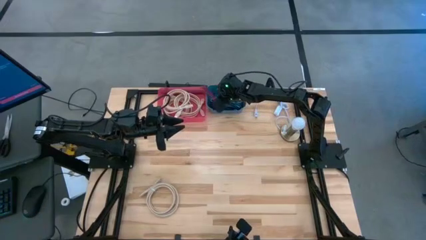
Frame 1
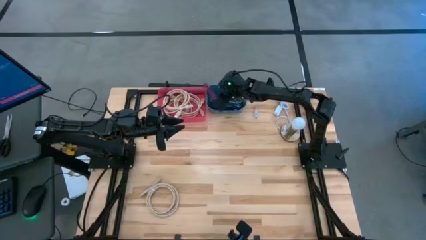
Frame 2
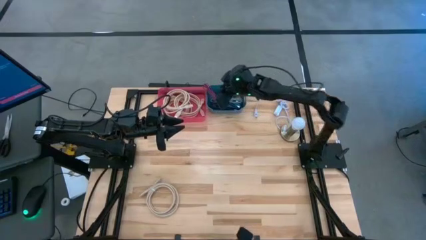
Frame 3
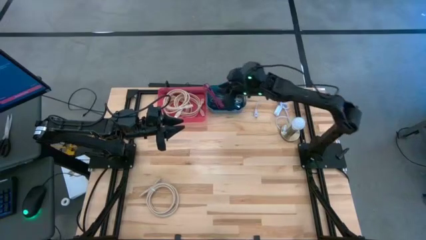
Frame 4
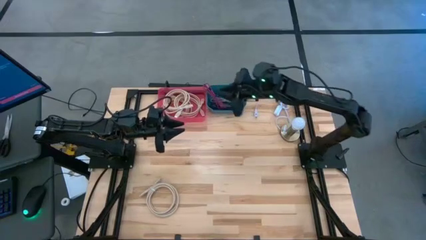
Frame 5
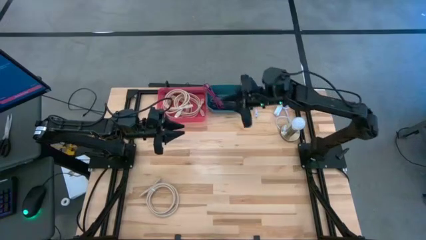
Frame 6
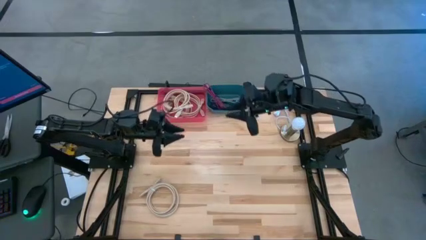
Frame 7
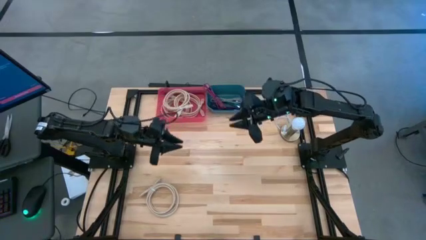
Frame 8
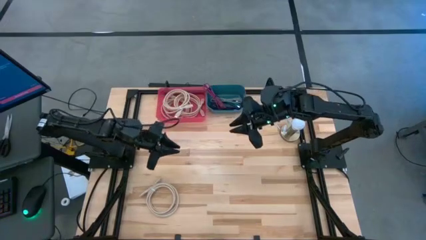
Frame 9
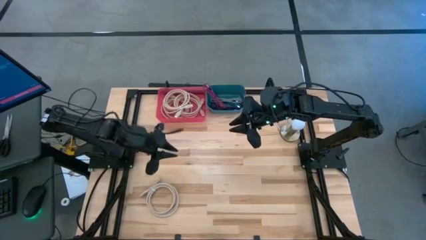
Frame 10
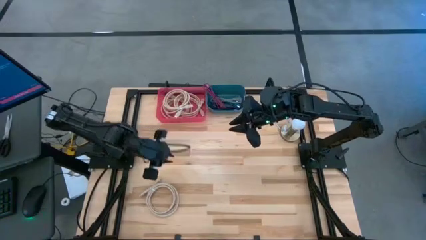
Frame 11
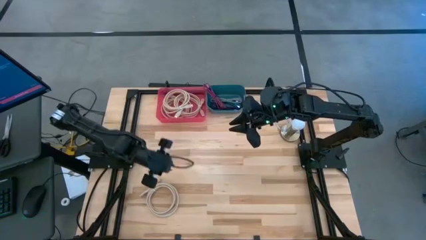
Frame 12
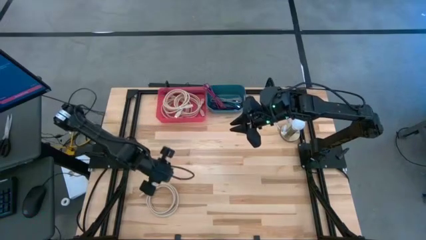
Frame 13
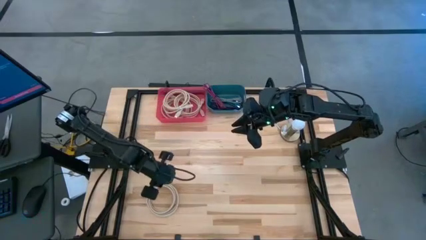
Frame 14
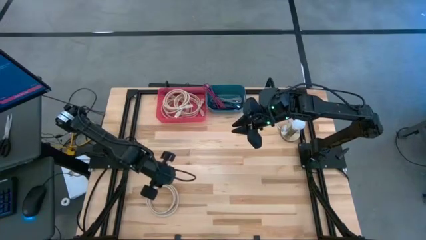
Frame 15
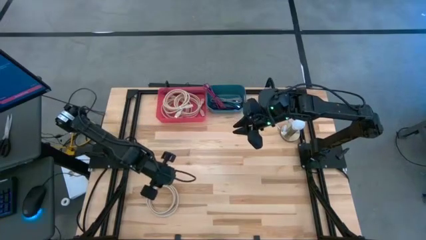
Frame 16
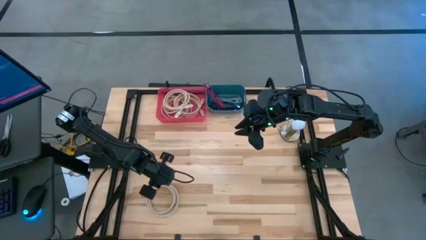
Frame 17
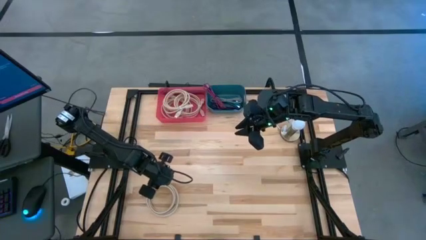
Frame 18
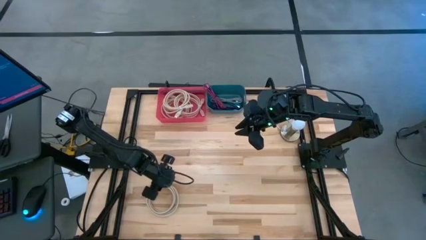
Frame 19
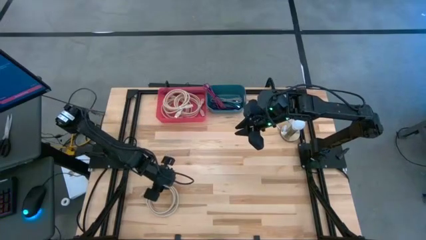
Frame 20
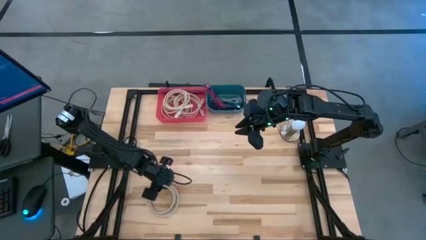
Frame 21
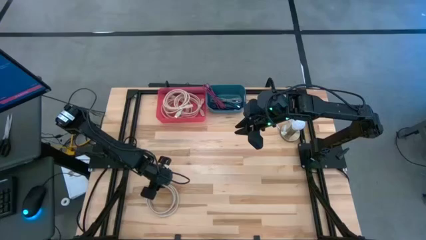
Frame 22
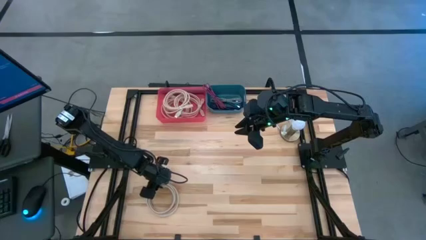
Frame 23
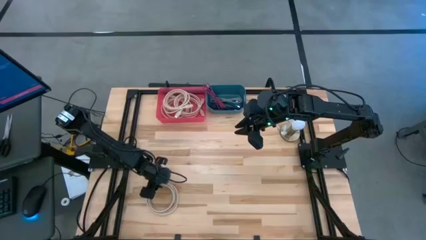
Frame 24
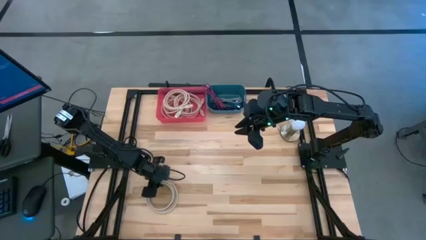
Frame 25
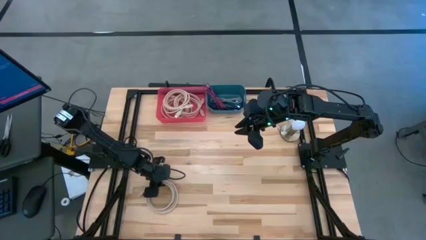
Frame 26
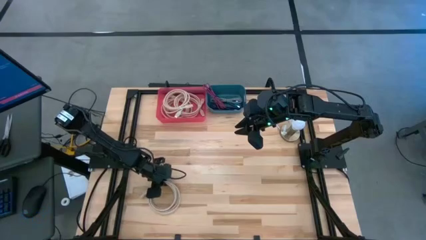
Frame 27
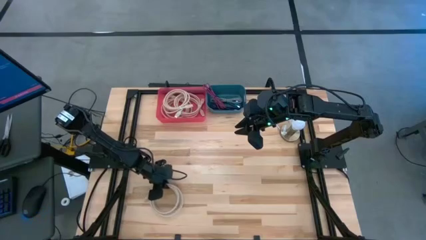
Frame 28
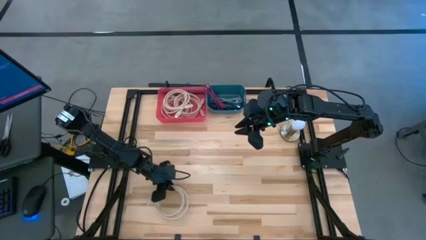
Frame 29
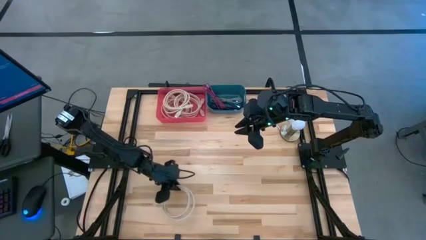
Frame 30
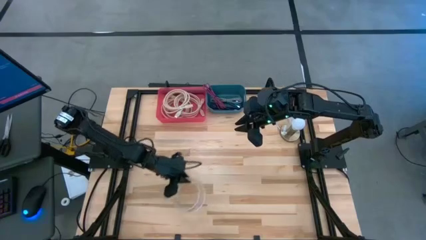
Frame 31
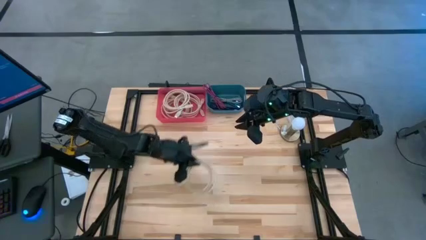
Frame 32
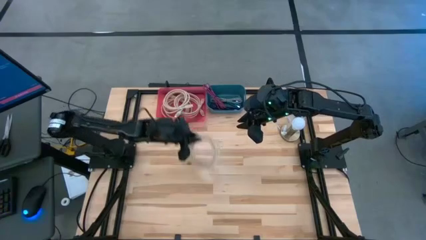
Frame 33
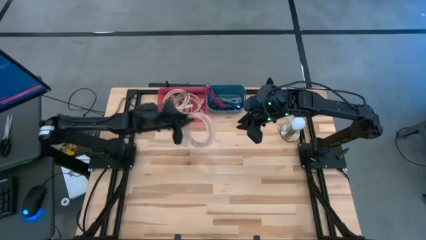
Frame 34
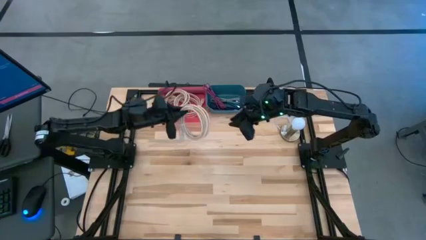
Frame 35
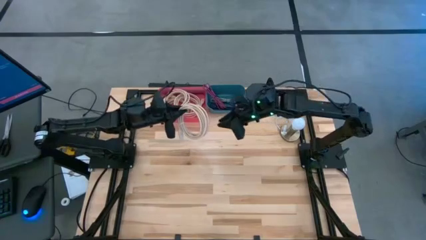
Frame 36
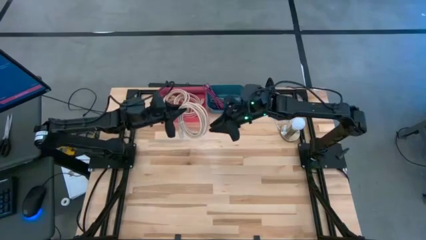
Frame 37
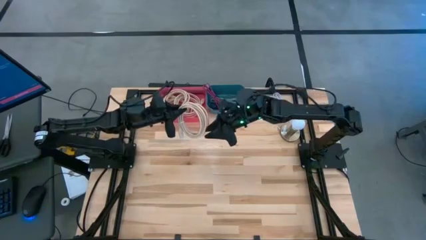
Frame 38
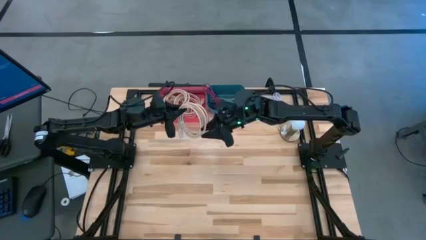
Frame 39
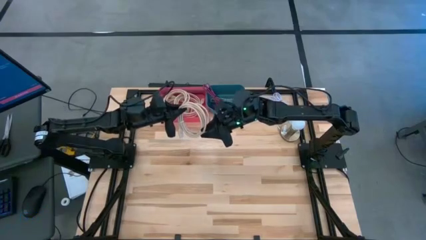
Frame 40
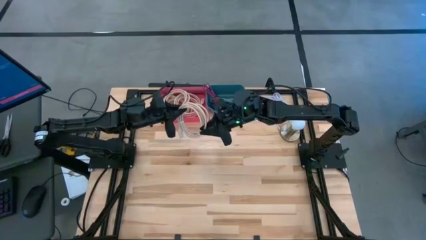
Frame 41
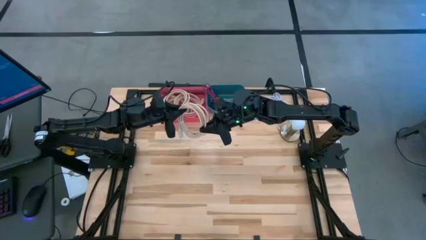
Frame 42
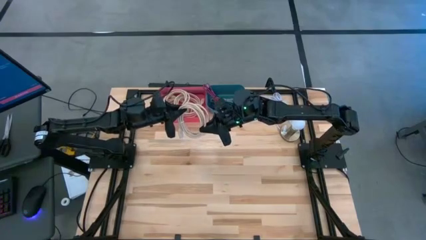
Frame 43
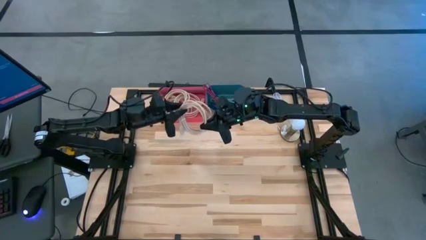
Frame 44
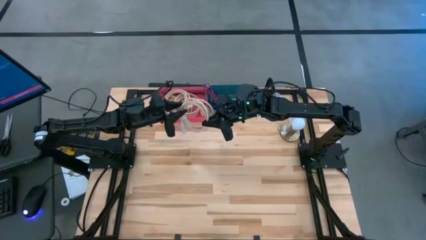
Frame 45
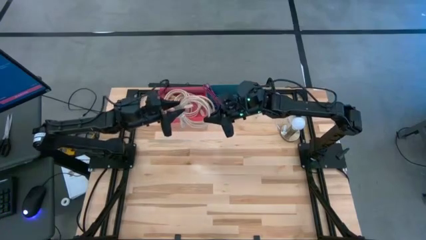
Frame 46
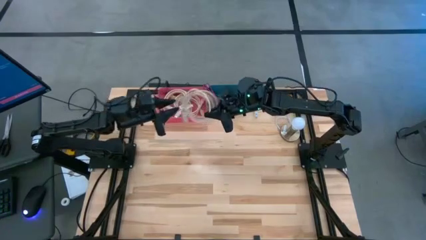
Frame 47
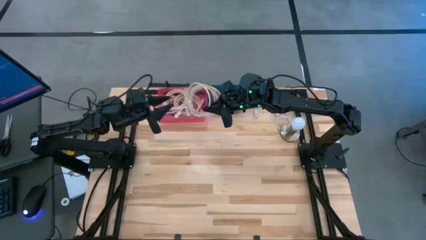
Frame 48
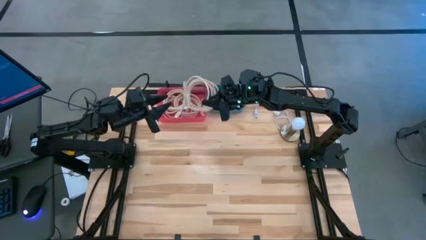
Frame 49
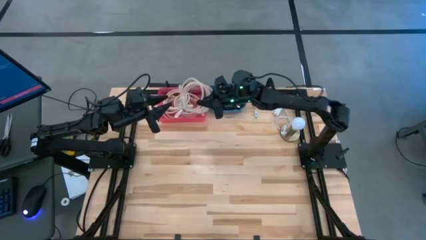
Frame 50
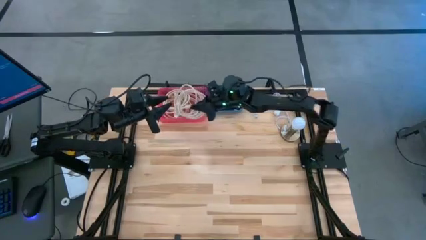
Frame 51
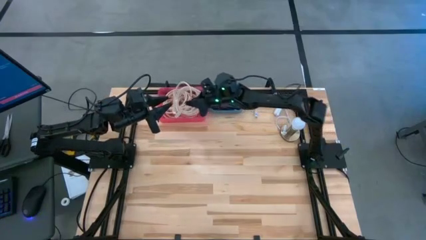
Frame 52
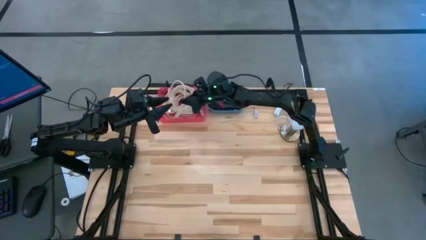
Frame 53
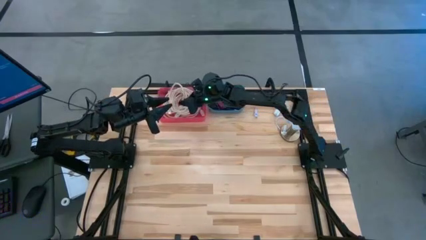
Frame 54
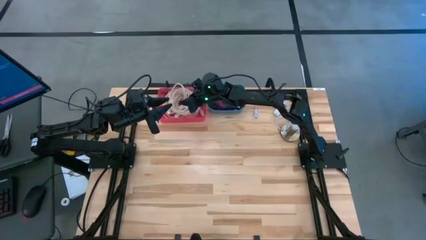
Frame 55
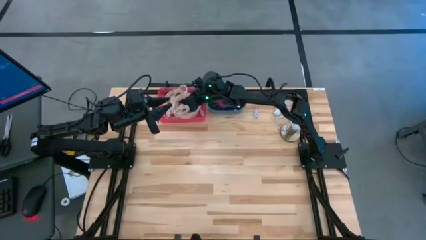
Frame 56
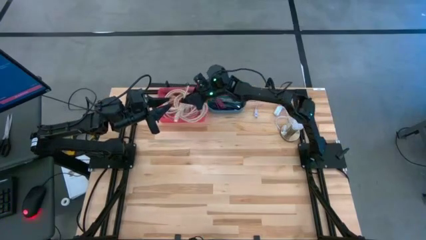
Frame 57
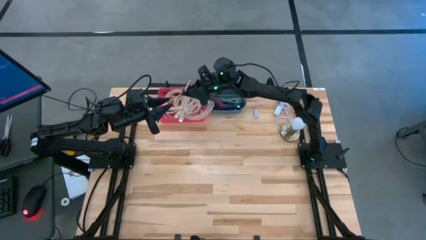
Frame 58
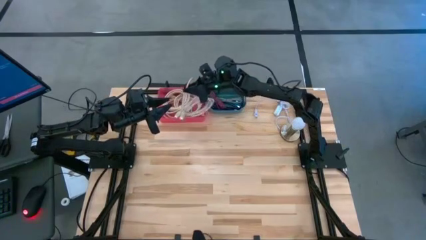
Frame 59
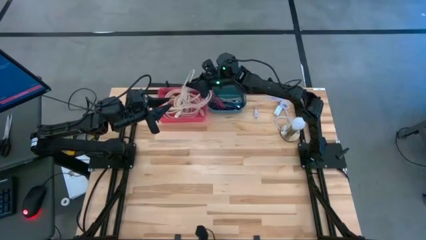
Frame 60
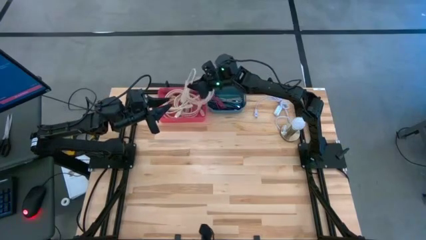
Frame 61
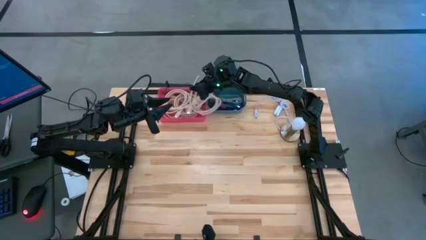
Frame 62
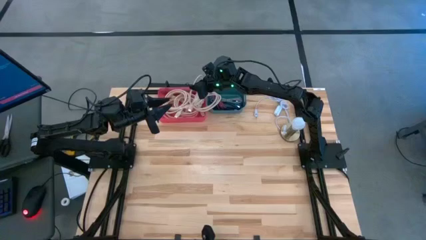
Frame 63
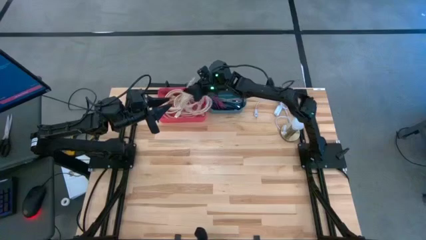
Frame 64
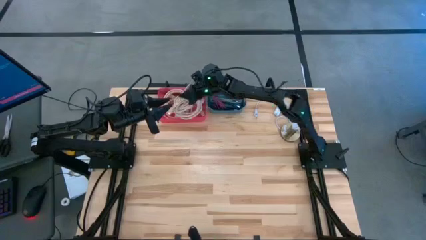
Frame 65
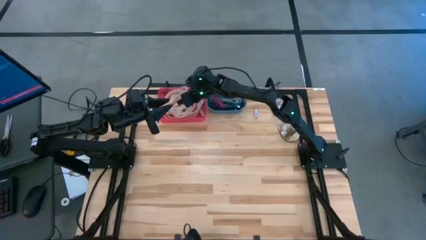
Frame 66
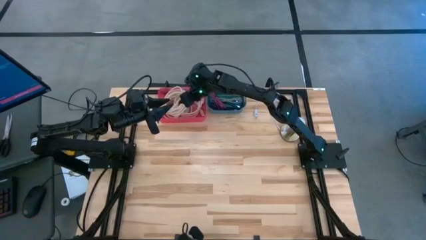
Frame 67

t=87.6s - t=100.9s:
Task: Pick & Place USB Port
Put the brown HDMI cable into the red bin

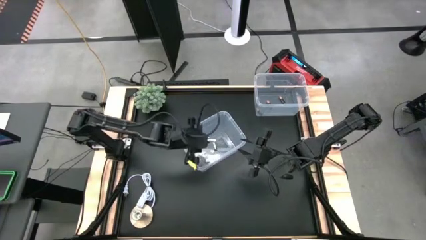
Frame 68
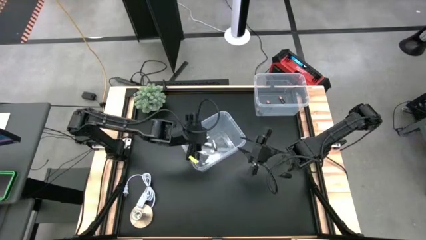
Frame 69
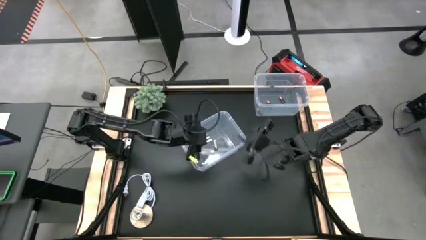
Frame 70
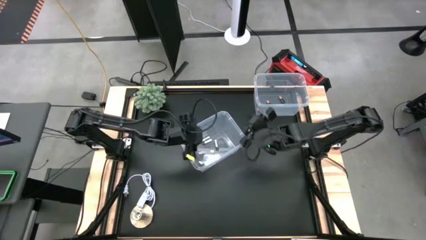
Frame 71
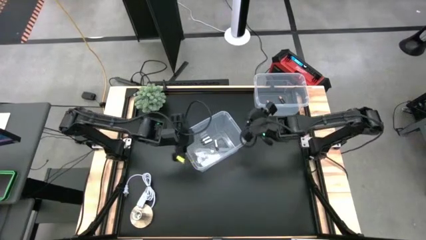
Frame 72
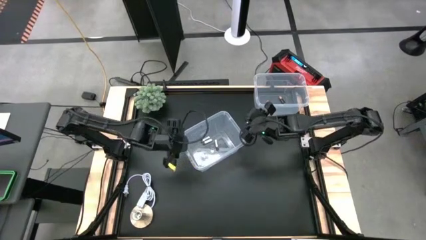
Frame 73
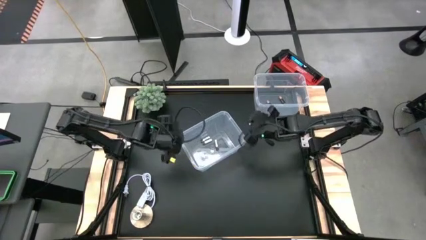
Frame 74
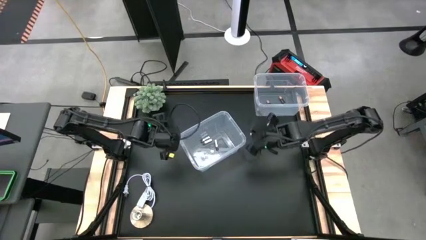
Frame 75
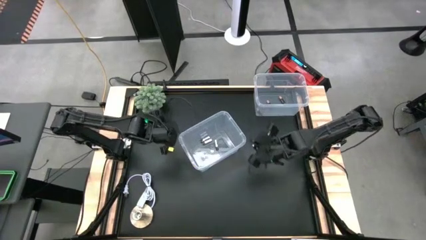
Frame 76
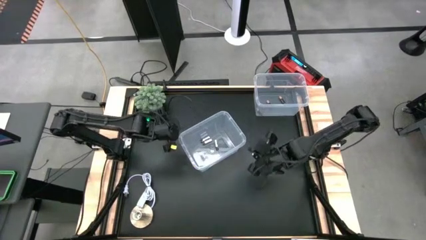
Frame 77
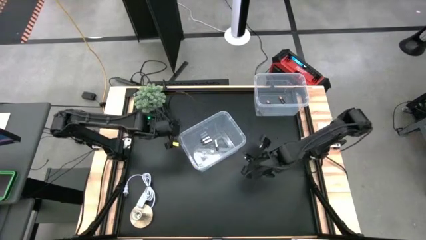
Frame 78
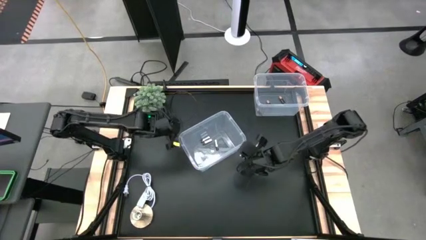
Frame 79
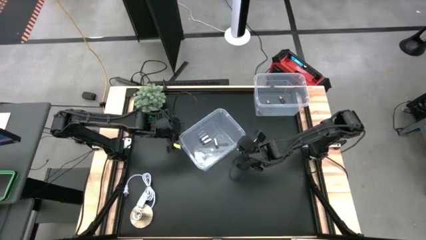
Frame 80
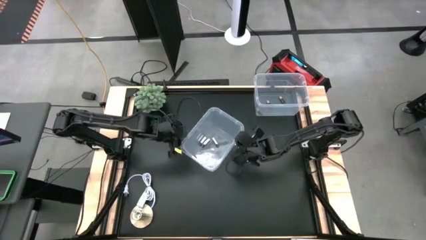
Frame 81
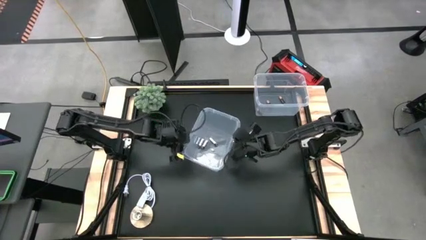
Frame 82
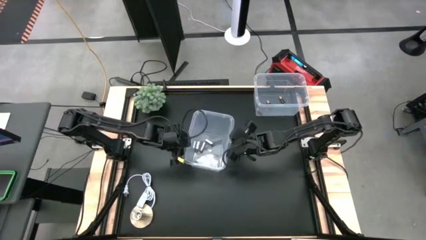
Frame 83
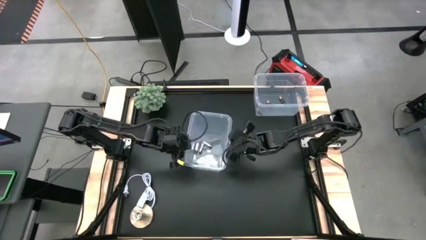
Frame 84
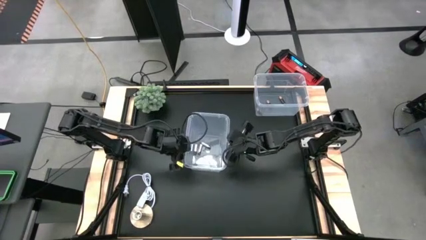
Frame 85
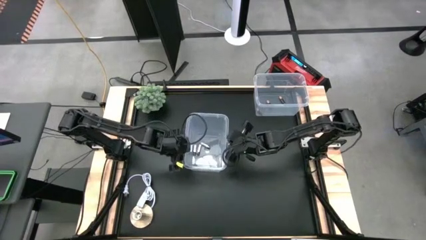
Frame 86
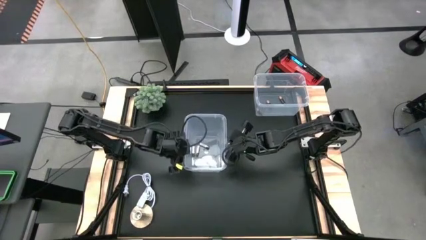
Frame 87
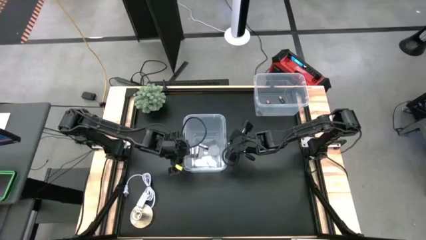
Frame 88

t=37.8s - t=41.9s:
Task: Sort batteries
Adjust the bottom transparent bin
